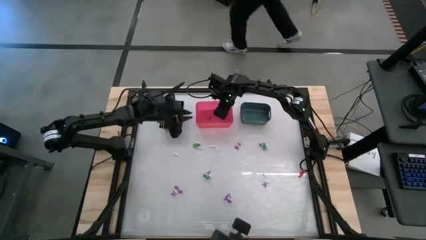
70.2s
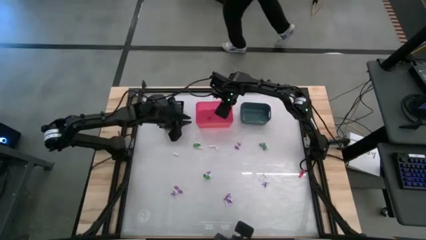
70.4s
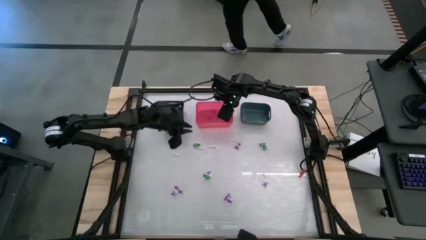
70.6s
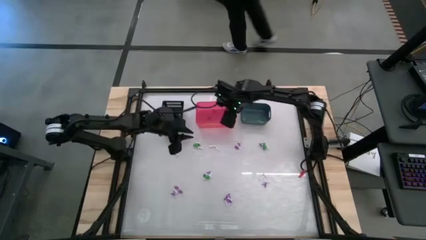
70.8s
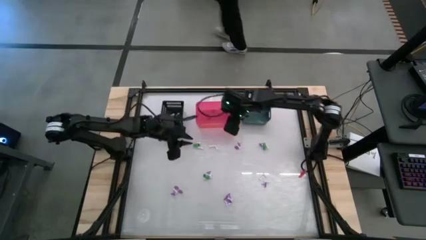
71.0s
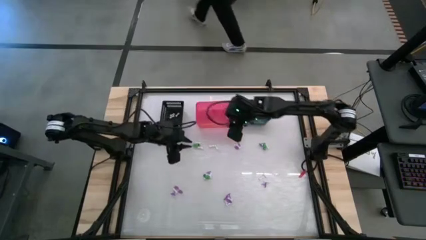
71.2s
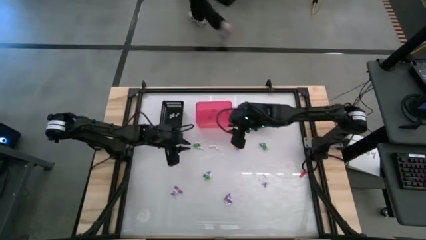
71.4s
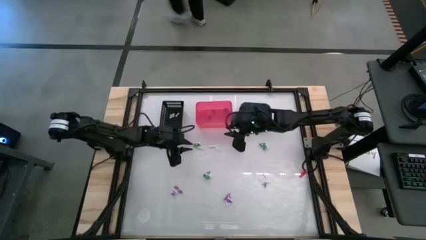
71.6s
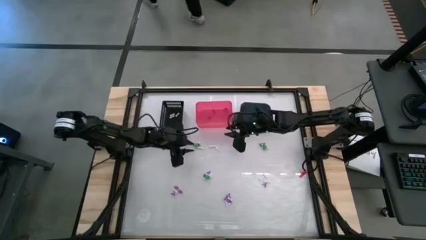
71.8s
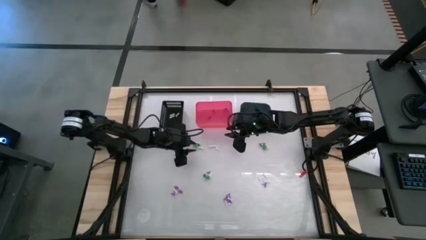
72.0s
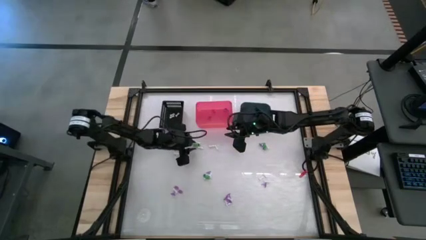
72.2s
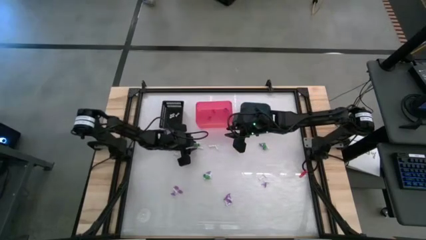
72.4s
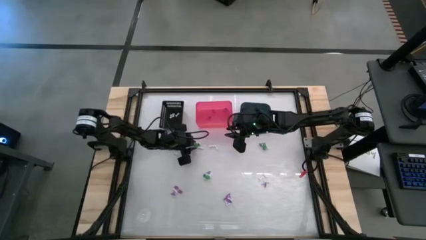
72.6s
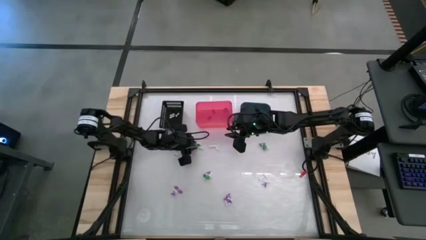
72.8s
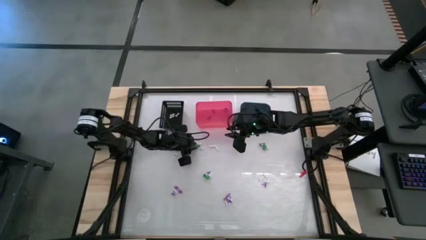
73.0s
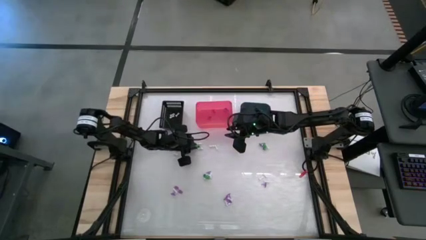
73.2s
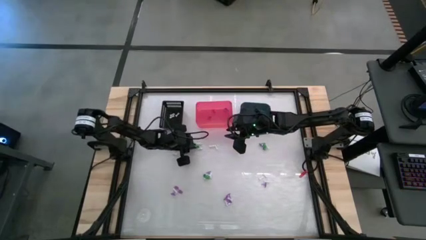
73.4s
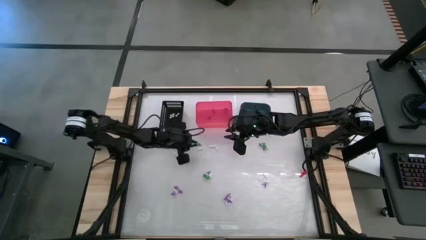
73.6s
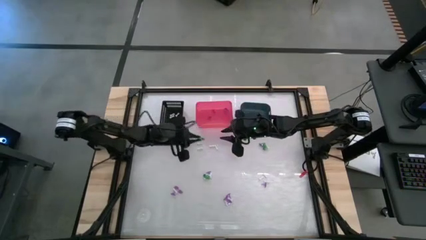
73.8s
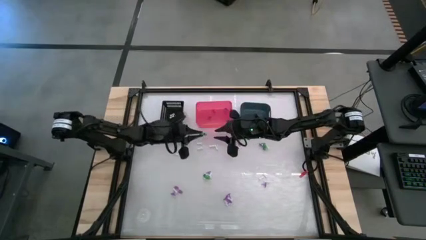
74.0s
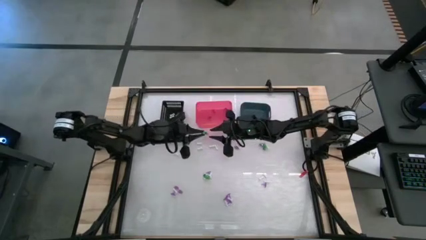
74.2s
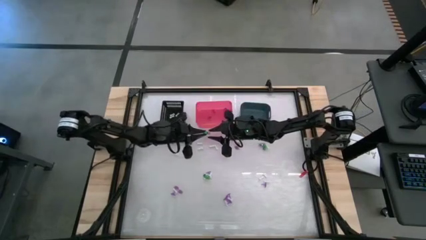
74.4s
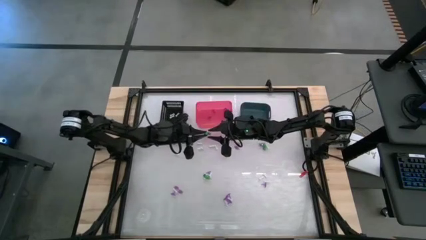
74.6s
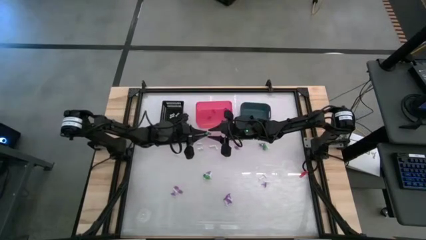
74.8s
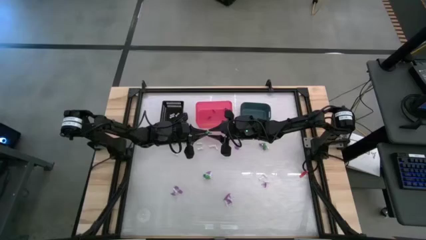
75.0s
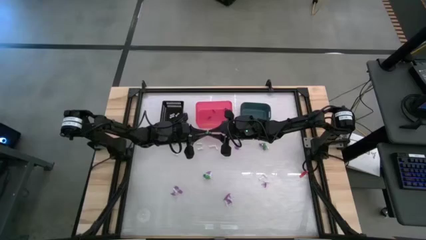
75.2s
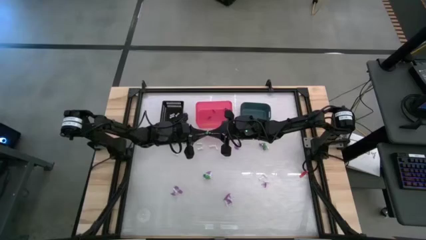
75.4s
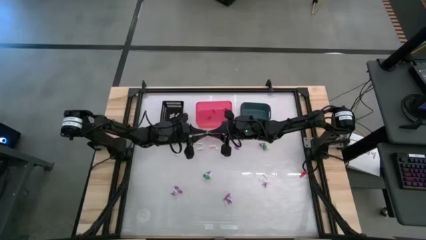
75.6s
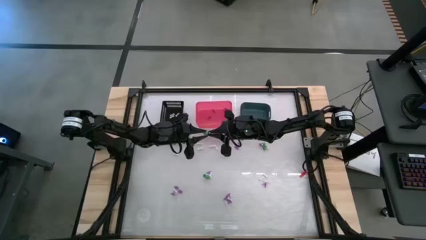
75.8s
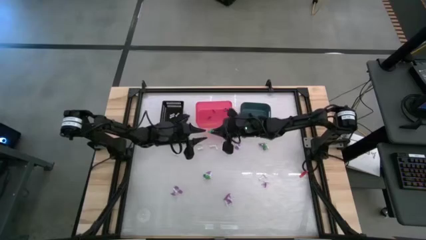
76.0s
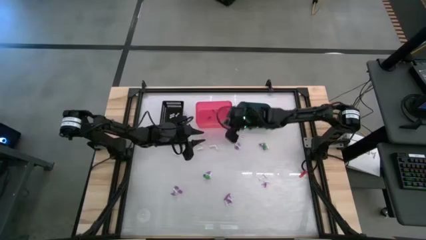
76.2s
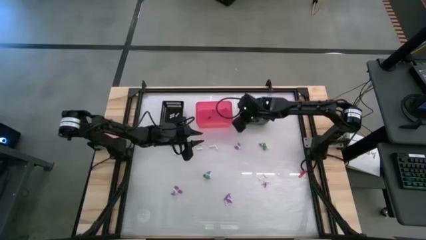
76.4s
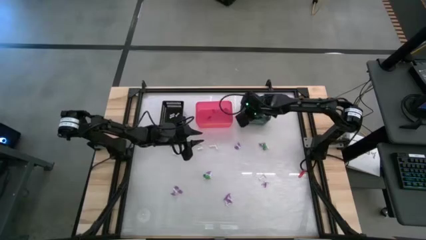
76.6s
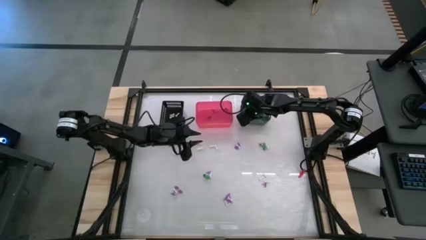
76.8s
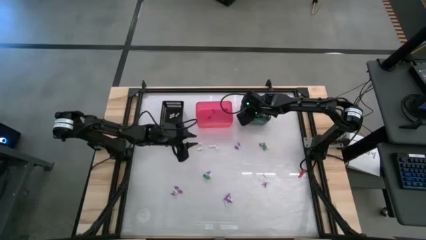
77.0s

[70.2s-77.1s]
Task: Sort Halloween decoration
Put the green skeleton toy into the blue bin

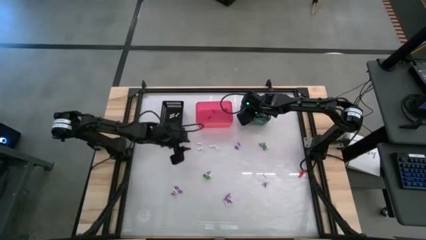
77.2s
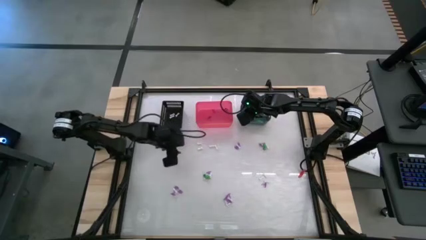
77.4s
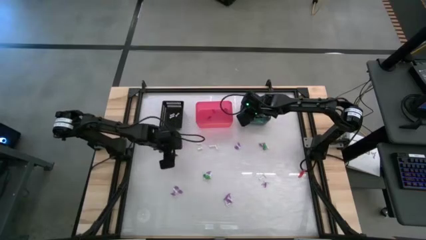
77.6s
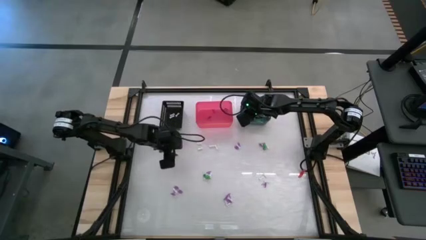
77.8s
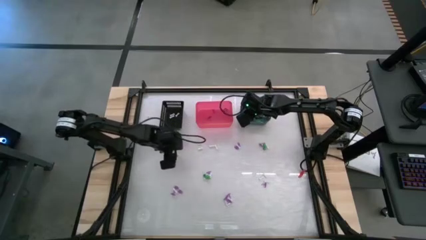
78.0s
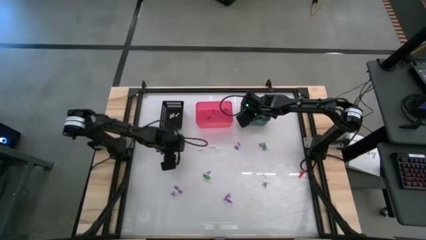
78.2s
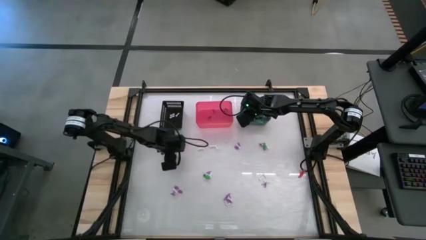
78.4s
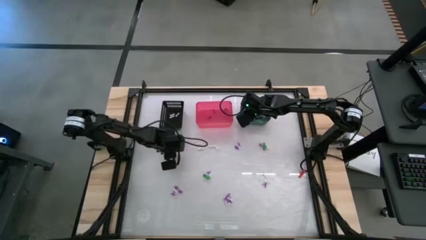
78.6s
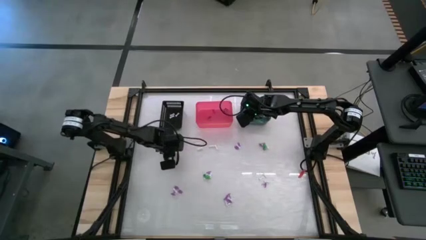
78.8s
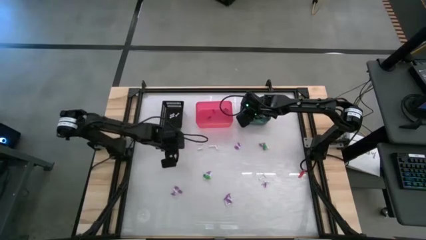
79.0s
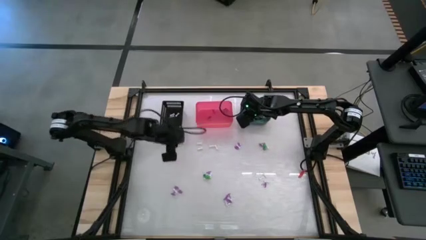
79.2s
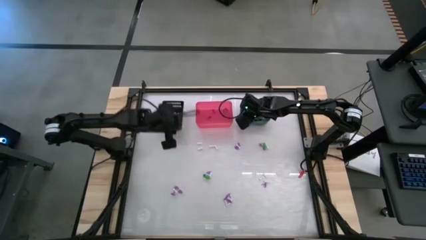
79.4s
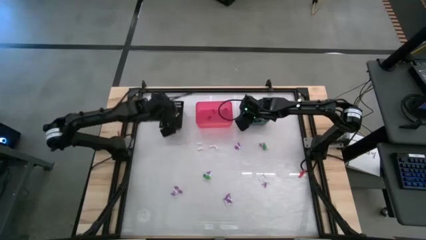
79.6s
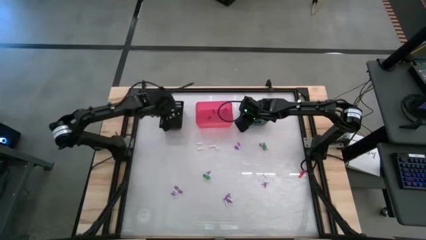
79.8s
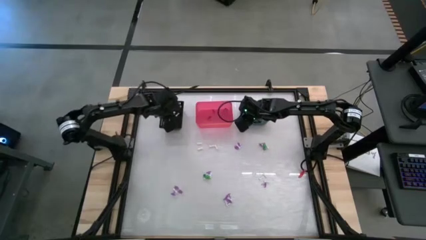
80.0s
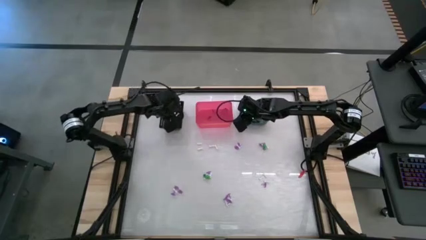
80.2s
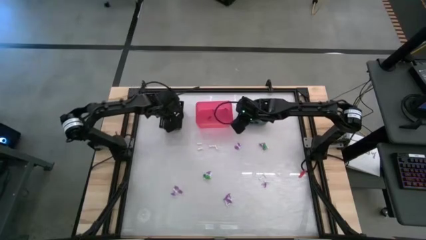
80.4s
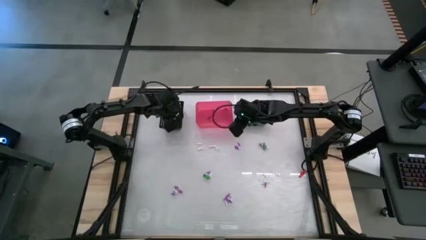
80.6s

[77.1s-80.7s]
Put the white bone toy into the black bin

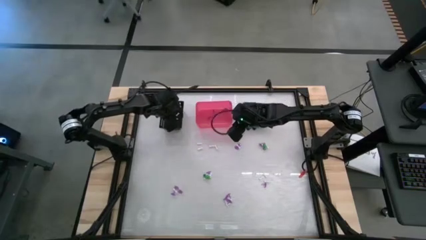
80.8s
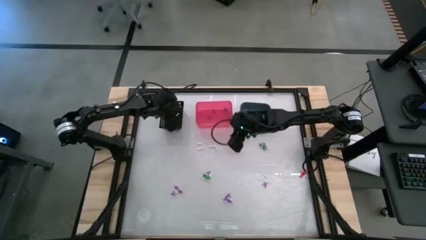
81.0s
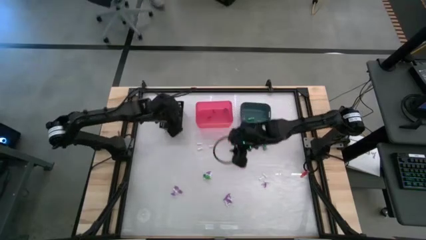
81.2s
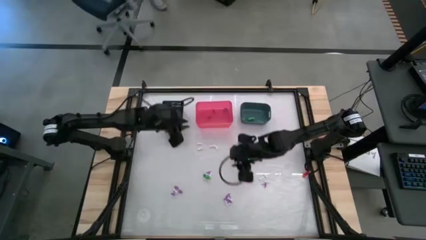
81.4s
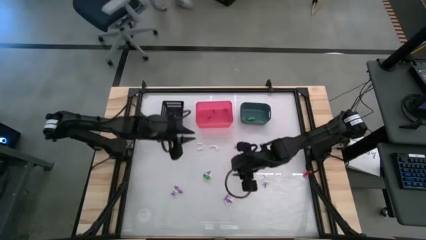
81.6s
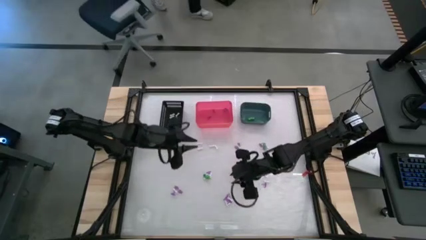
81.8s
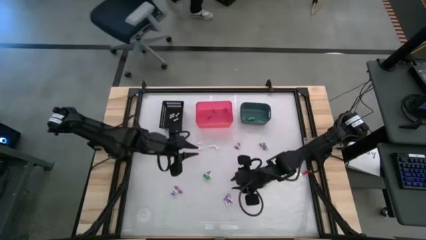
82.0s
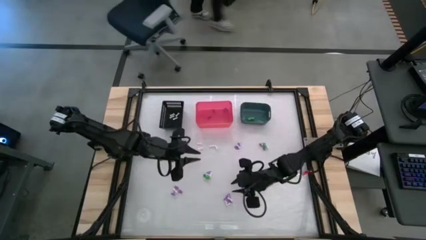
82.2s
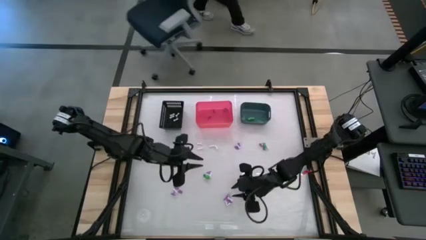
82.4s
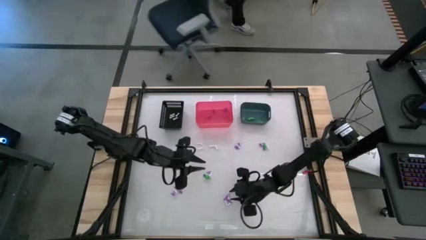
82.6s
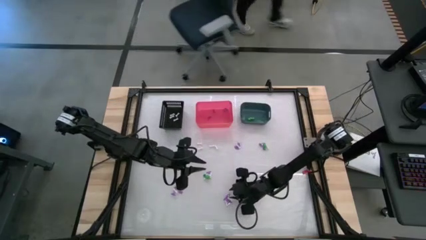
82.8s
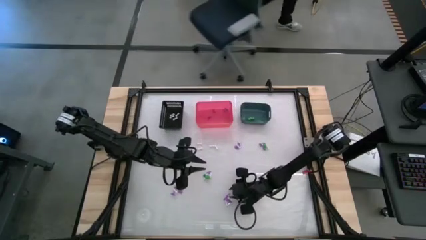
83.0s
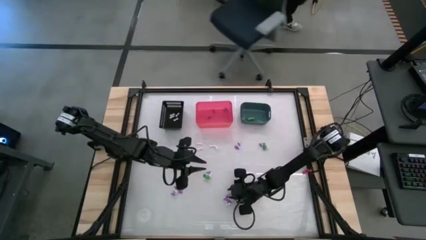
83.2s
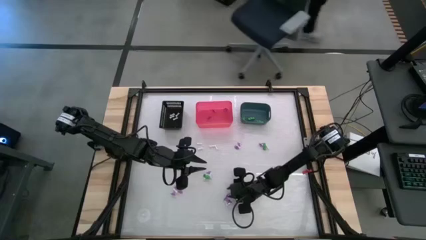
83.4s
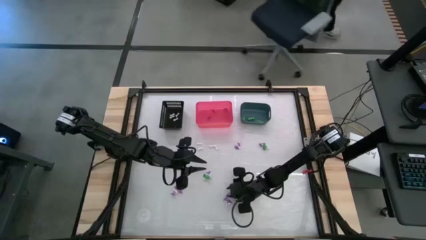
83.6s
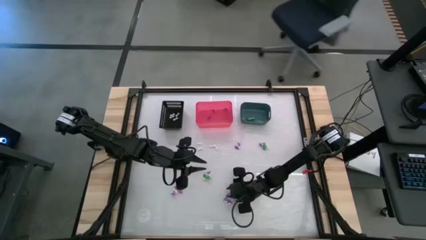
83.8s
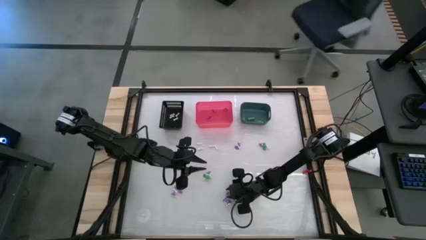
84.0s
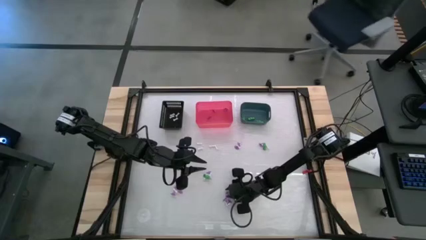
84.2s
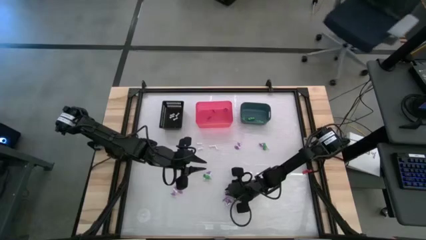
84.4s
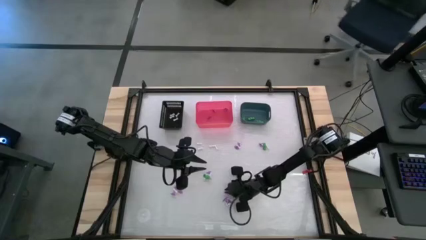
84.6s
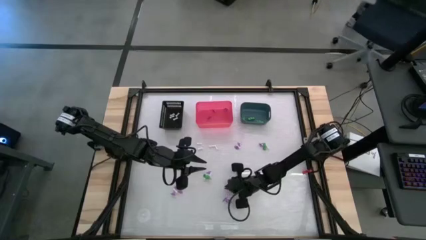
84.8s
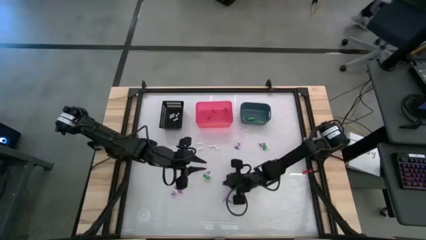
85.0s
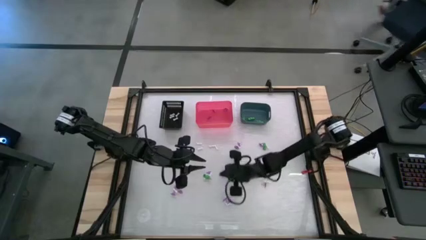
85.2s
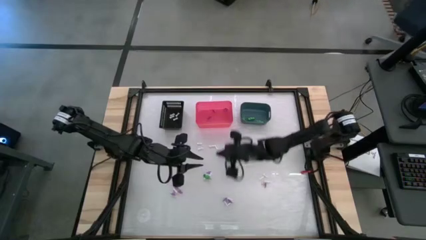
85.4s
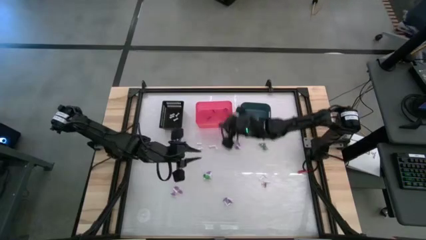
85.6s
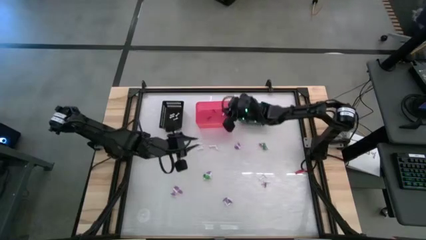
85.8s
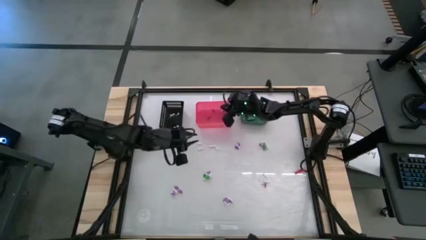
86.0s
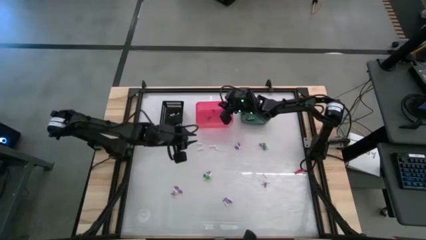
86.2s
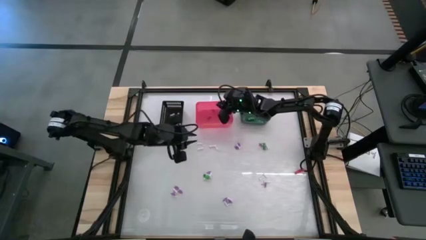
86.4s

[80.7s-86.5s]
Put the purple hat toy into the pink bin
